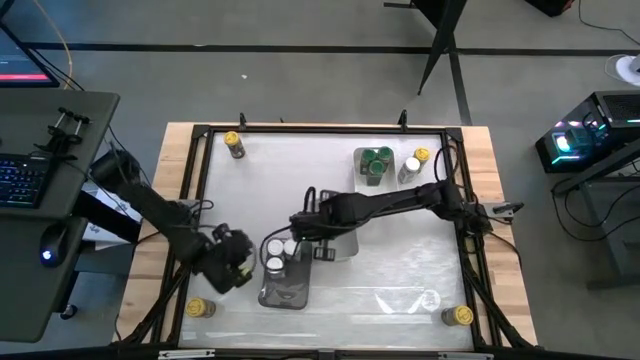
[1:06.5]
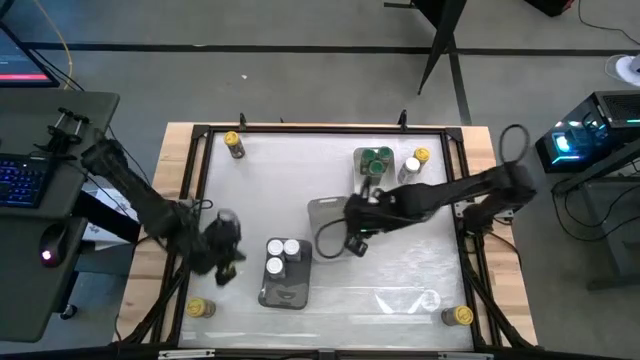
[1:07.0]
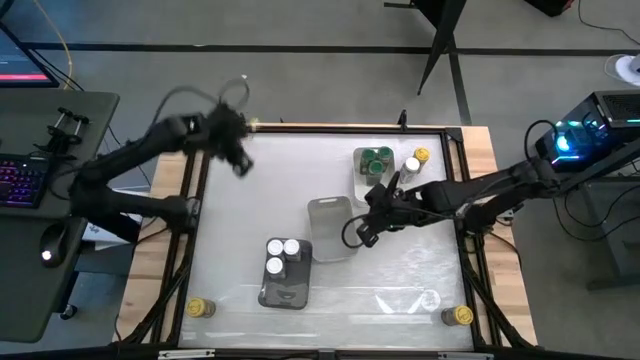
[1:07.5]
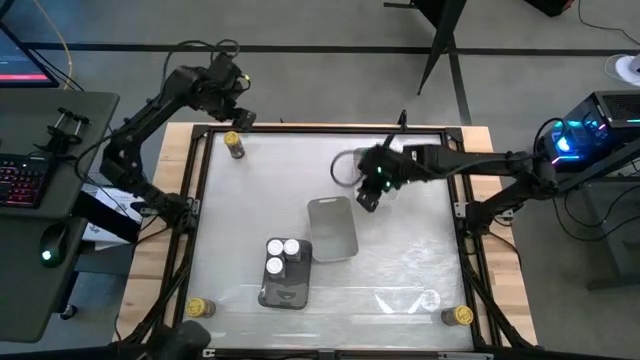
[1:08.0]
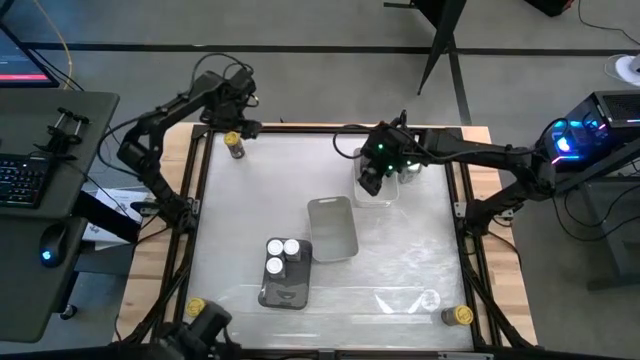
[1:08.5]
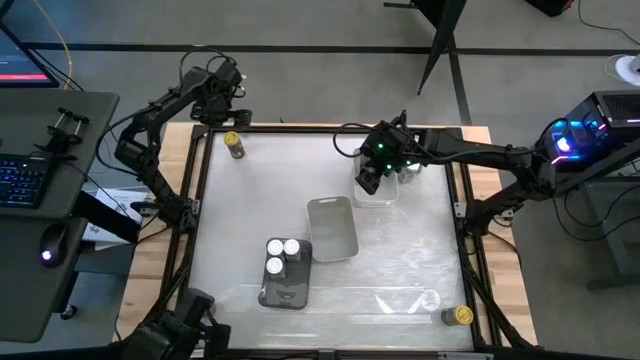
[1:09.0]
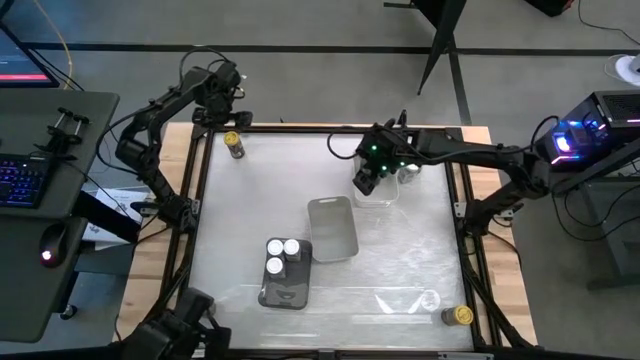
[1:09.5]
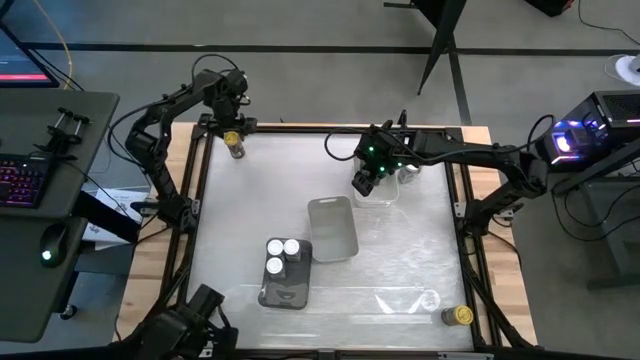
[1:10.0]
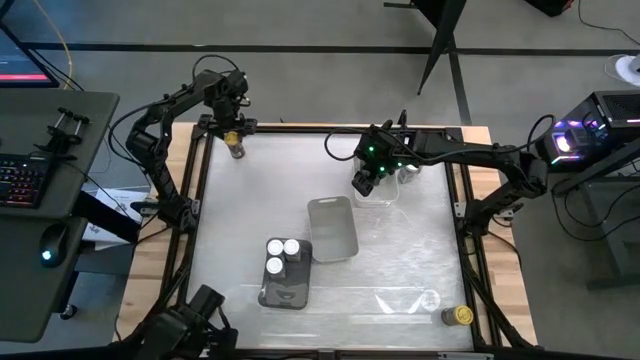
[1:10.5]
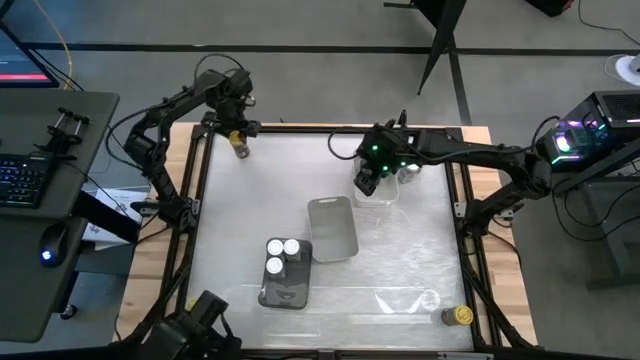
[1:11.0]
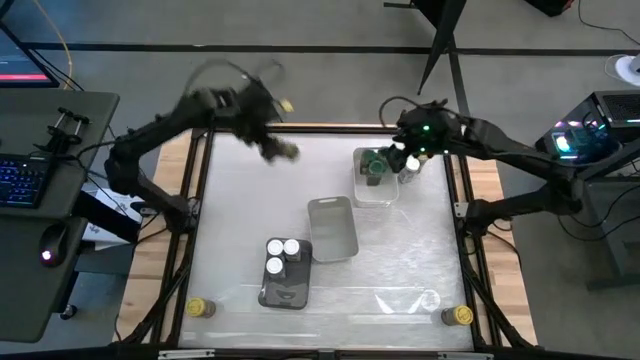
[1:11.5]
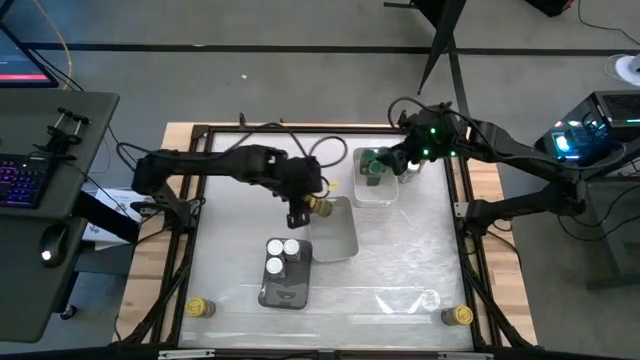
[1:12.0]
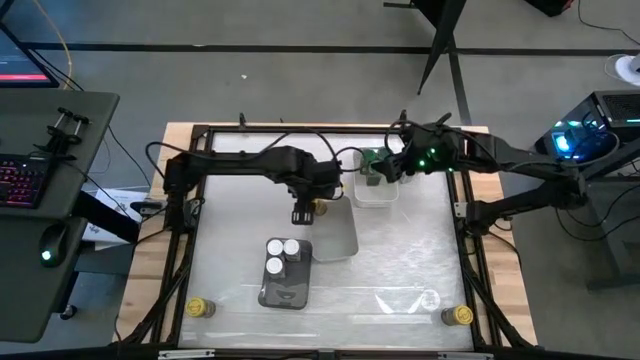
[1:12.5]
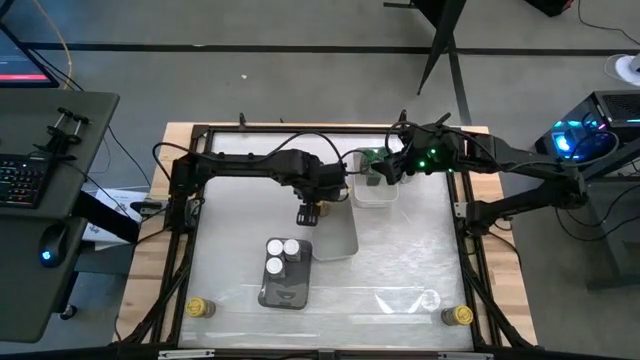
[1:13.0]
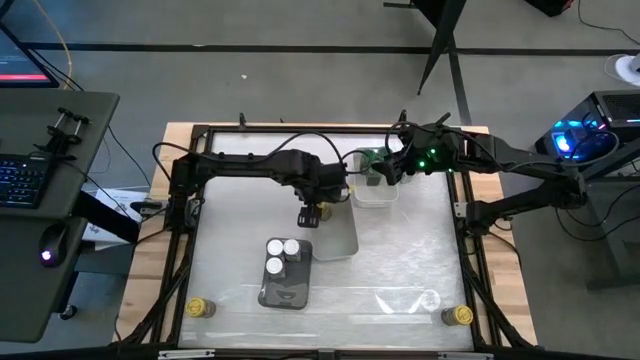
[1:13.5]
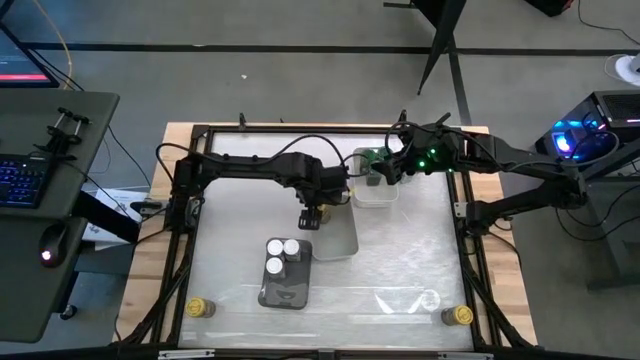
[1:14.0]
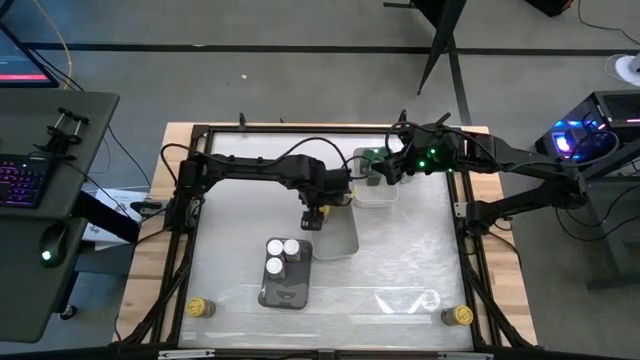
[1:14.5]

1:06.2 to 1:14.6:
Task: Sort spices by type
Put the yellow seasoning bottle into the gray bin

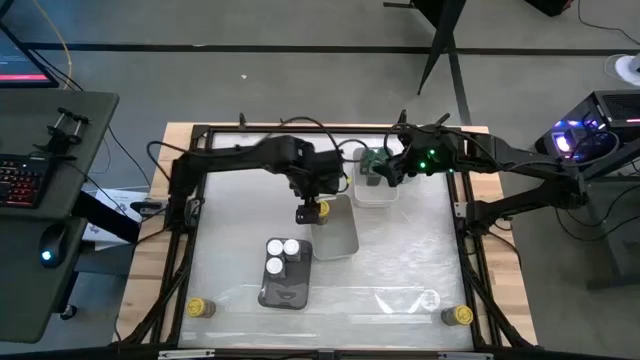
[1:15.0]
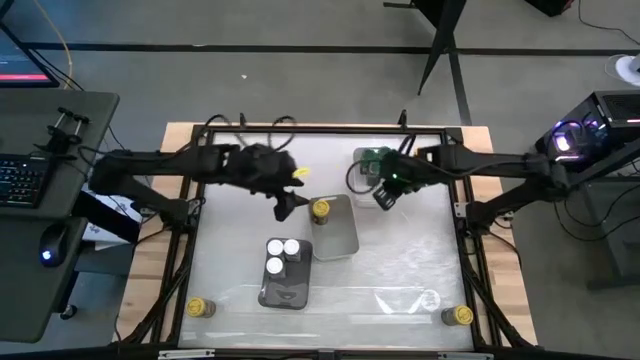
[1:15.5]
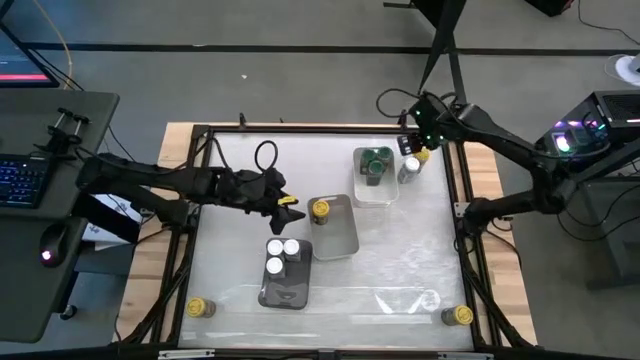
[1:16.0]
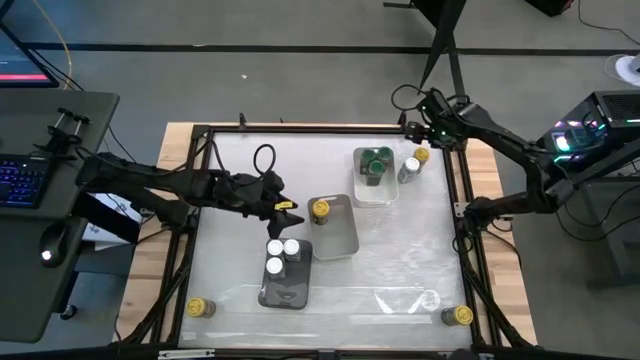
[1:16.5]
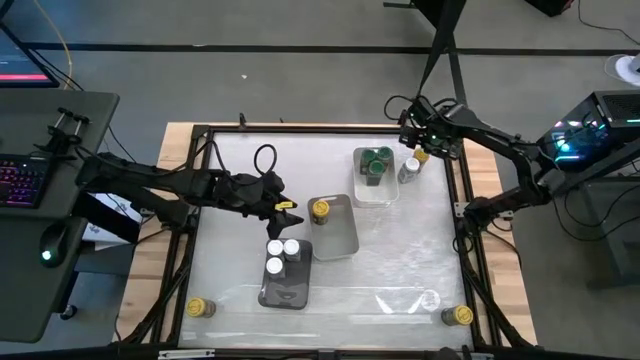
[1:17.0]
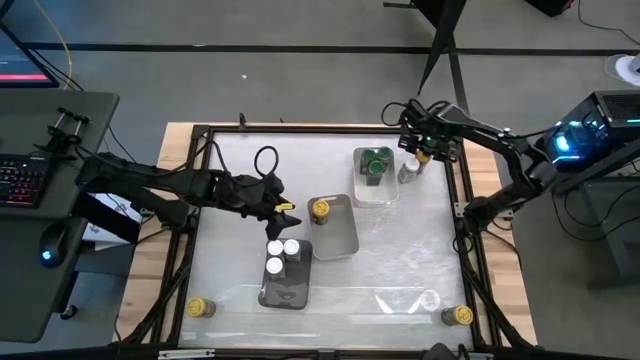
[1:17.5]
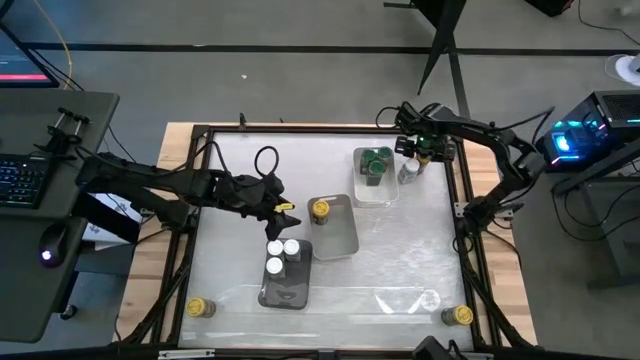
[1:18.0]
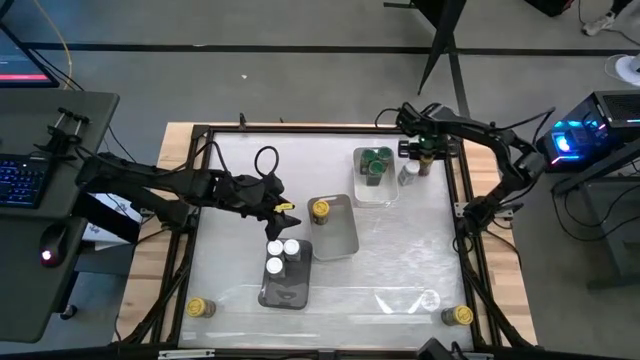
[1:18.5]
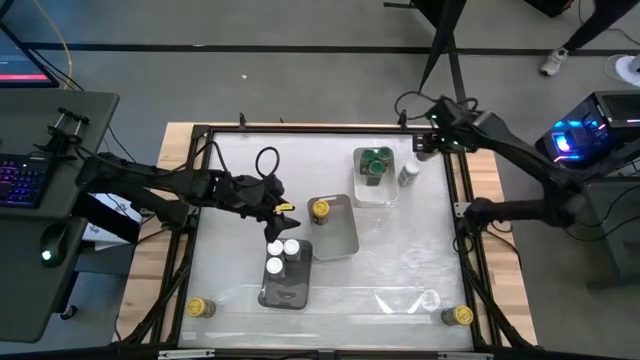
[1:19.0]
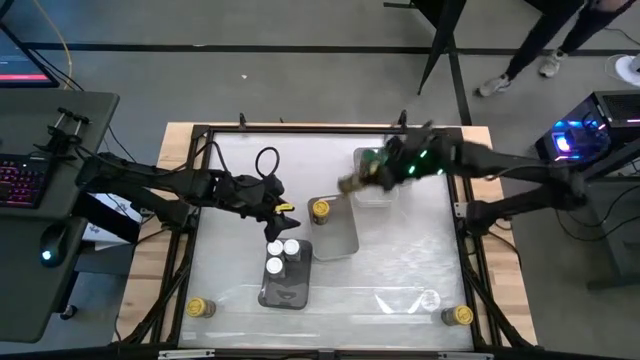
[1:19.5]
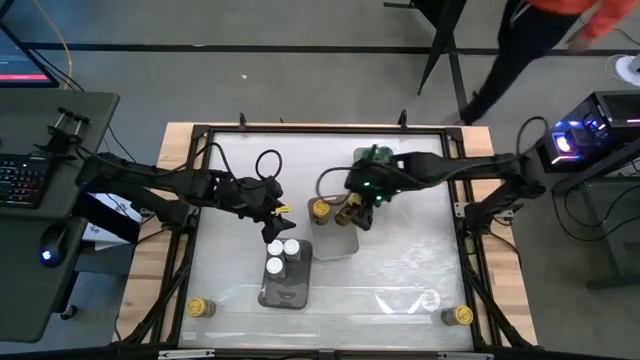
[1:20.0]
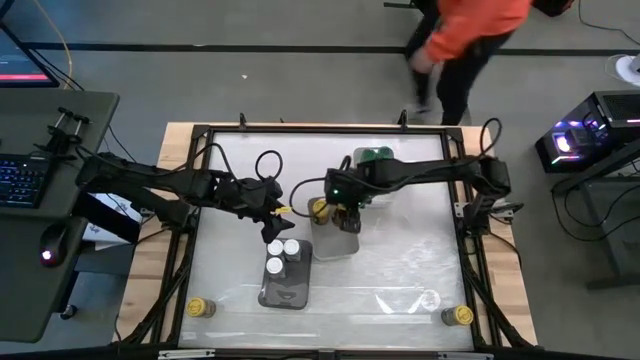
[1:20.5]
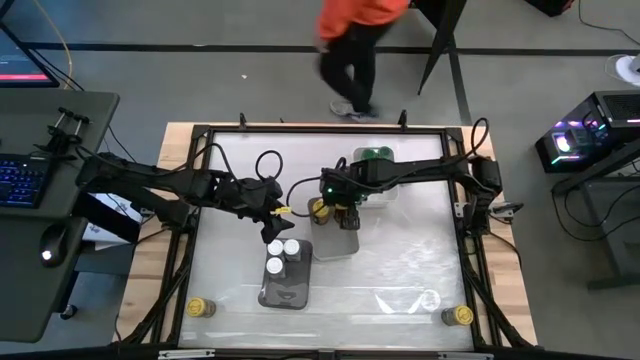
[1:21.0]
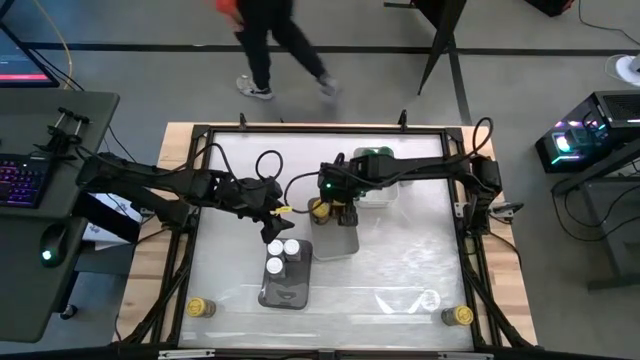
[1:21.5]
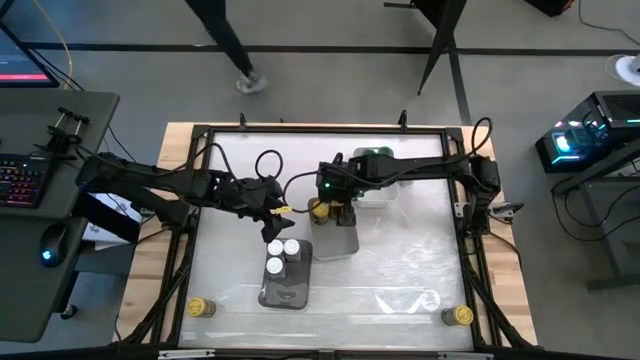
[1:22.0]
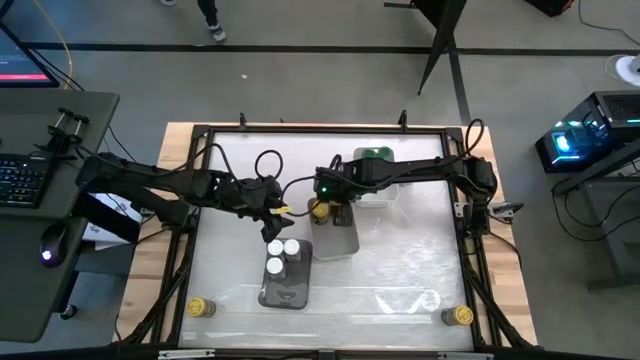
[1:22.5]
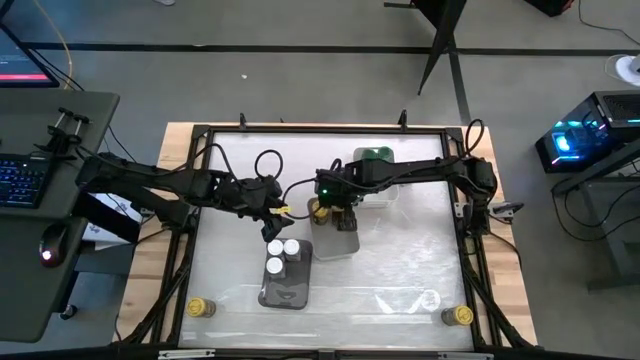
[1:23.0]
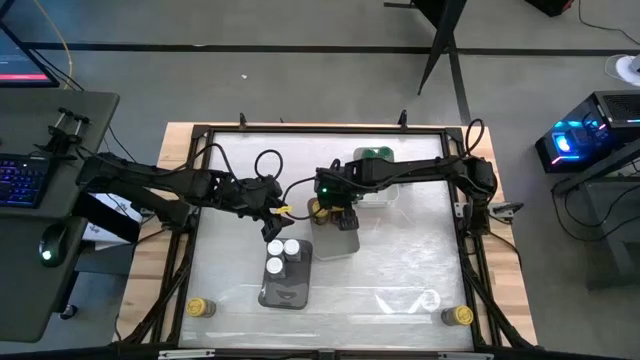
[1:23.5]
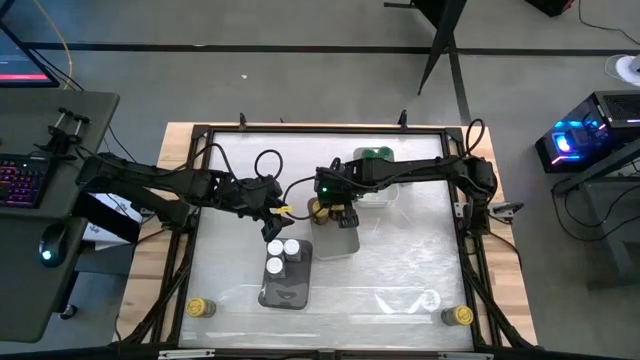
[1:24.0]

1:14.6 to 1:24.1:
Put the yellow seasoning bottle into the gray bin

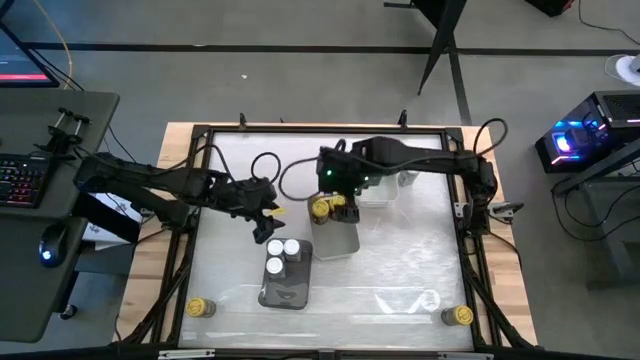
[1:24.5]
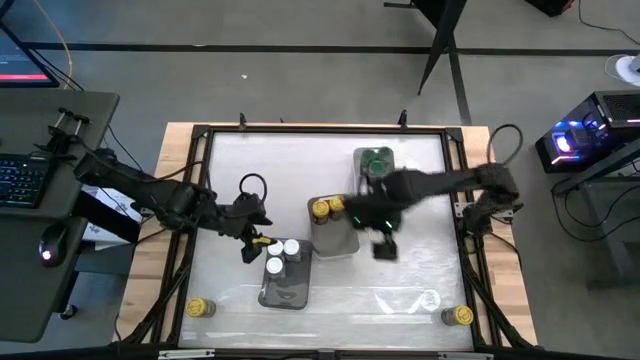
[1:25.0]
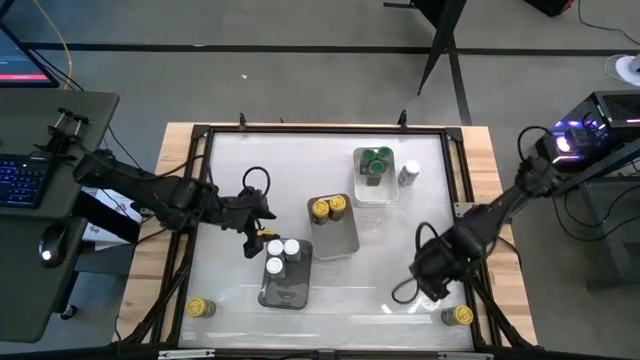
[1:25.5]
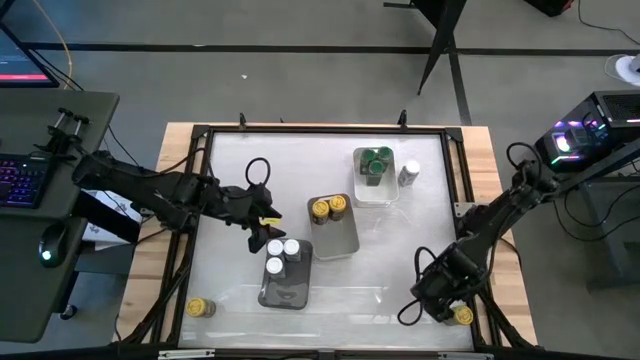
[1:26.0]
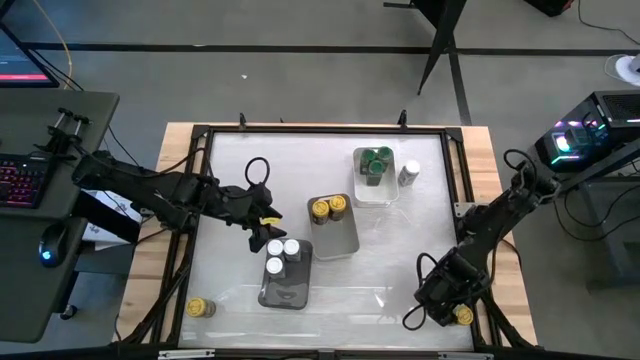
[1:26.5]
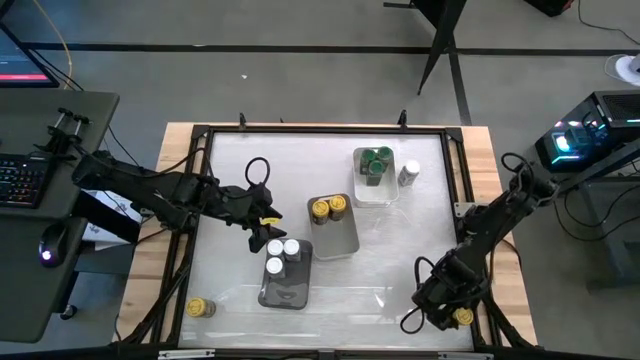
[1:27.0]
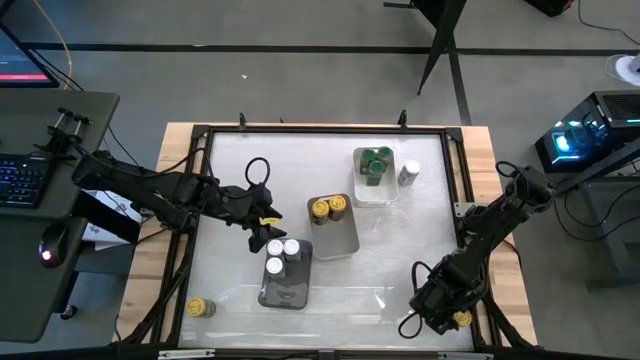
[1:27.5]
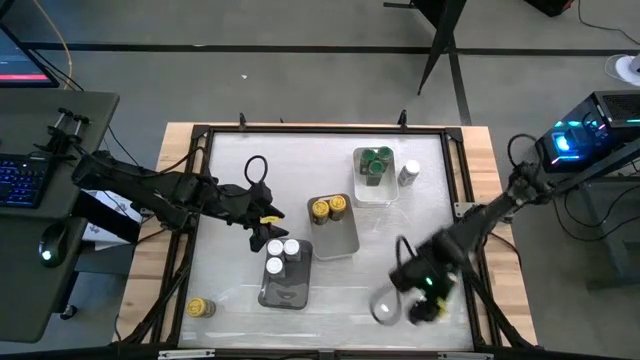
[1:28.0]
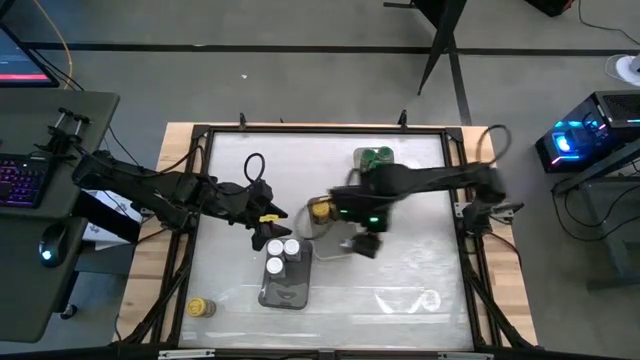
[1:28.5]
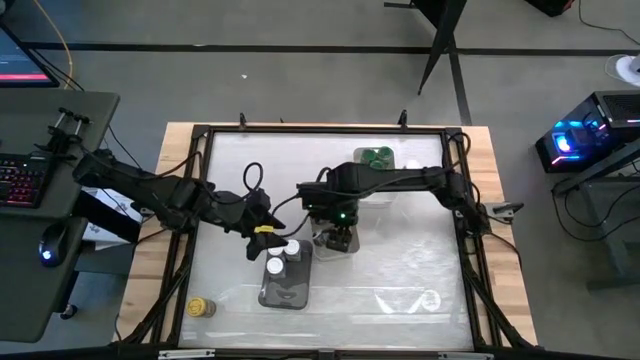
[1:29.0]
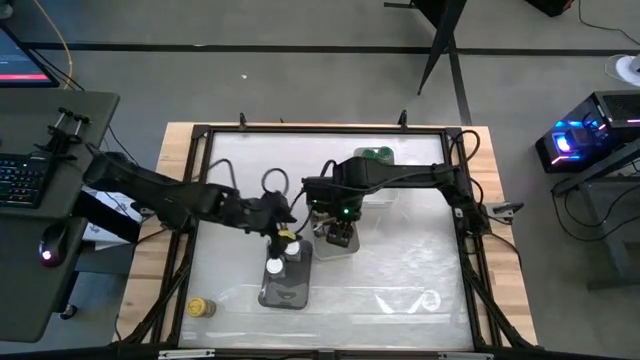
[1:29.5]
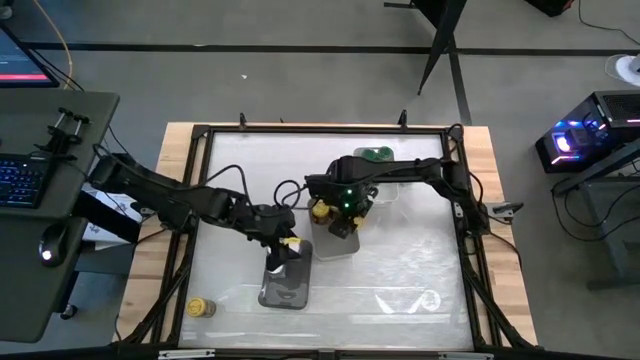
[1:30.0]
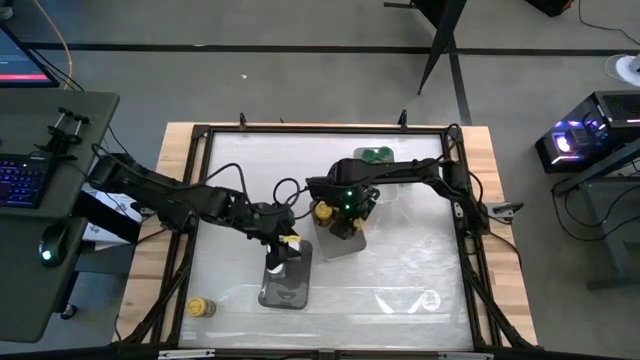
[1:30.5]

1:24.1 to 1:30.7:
Put the yellow seasoning bottle into the gray bin
